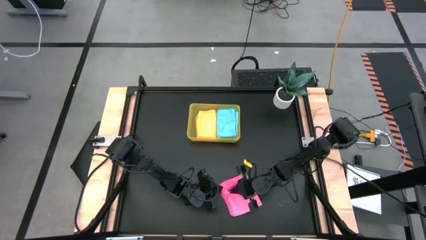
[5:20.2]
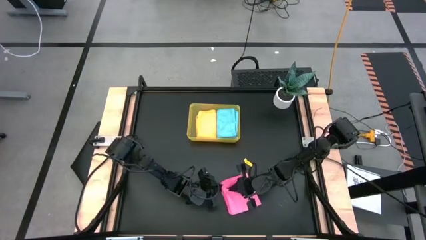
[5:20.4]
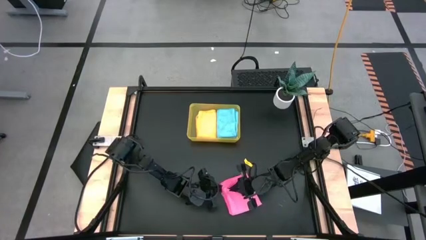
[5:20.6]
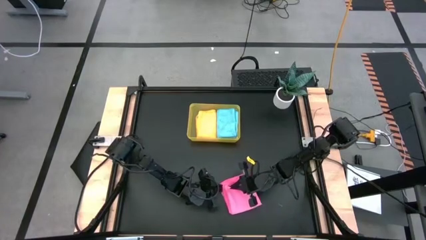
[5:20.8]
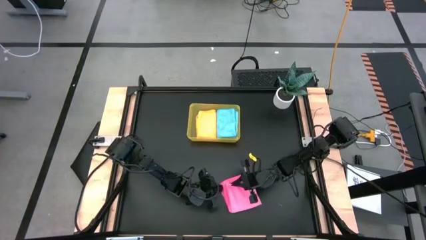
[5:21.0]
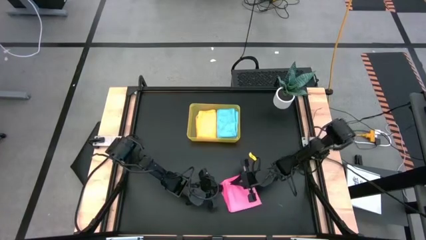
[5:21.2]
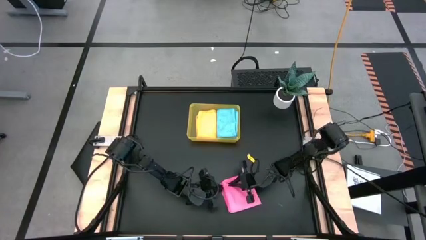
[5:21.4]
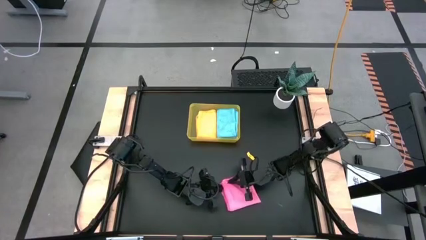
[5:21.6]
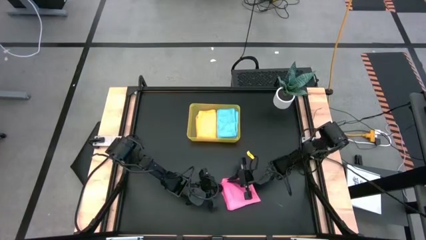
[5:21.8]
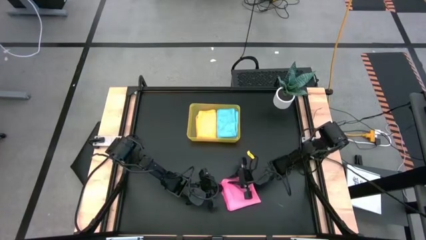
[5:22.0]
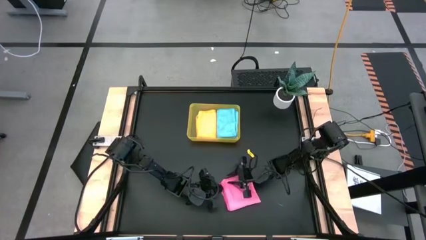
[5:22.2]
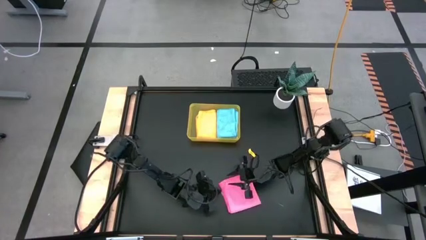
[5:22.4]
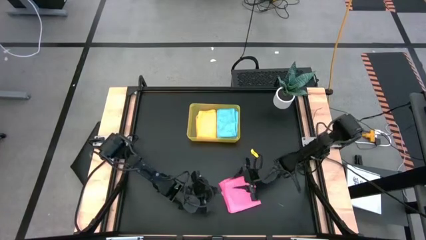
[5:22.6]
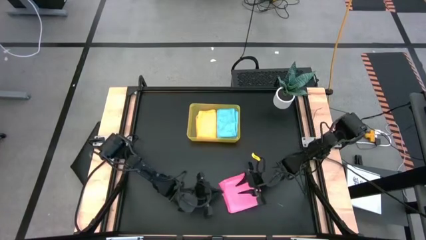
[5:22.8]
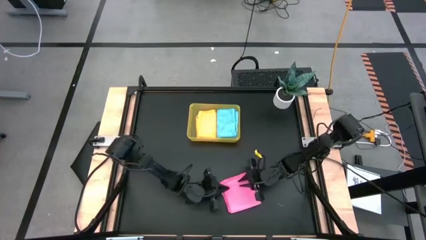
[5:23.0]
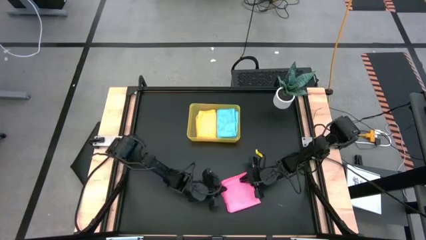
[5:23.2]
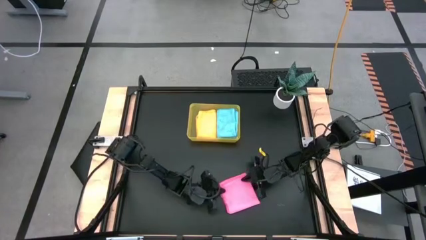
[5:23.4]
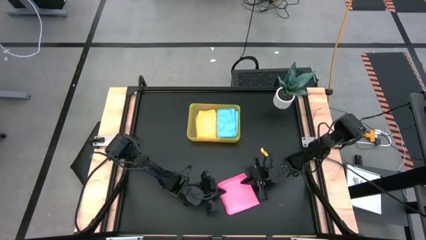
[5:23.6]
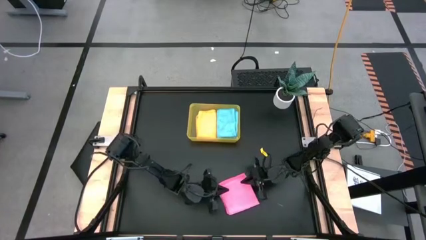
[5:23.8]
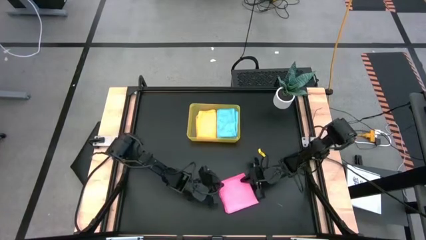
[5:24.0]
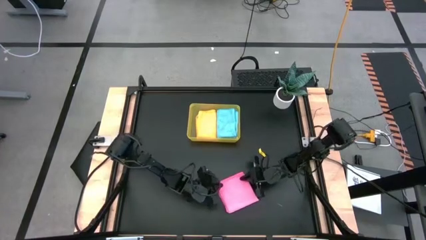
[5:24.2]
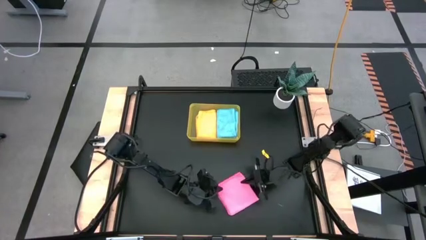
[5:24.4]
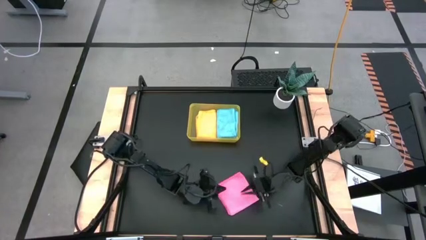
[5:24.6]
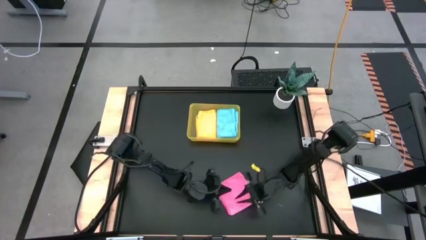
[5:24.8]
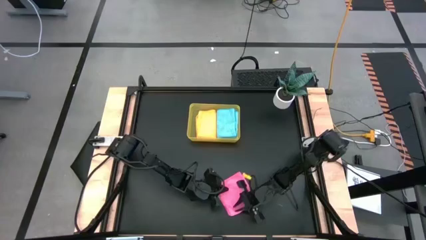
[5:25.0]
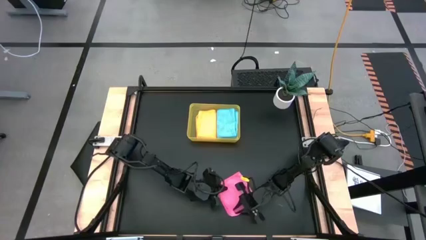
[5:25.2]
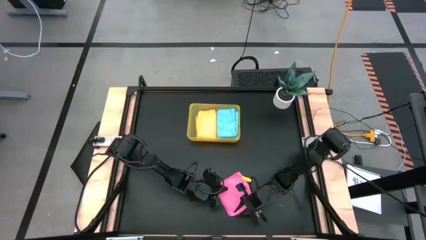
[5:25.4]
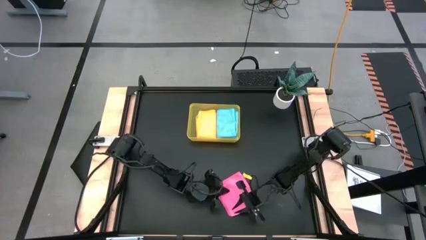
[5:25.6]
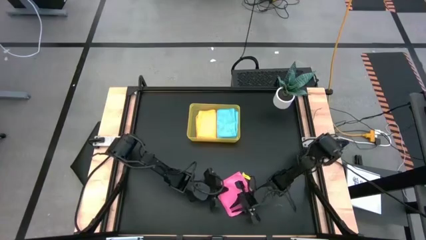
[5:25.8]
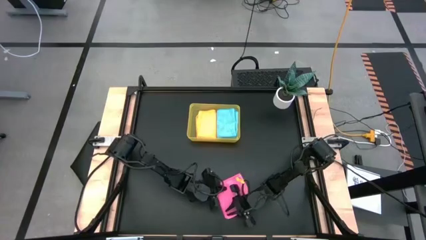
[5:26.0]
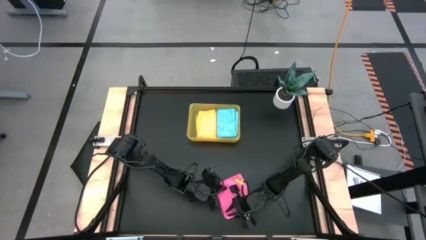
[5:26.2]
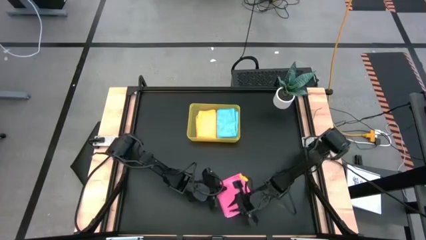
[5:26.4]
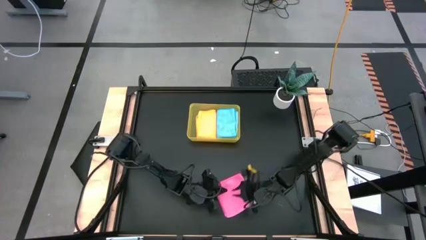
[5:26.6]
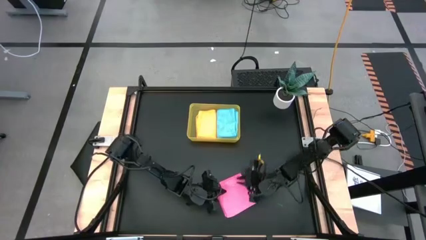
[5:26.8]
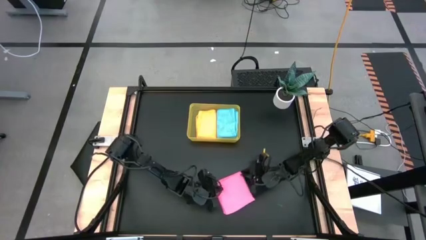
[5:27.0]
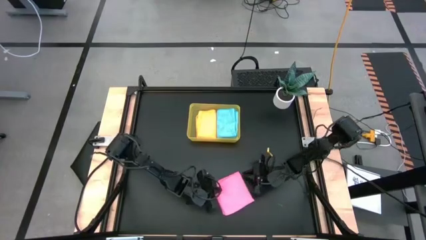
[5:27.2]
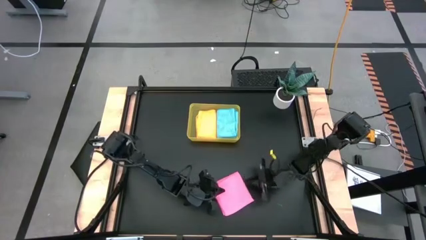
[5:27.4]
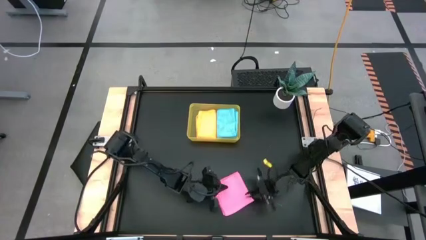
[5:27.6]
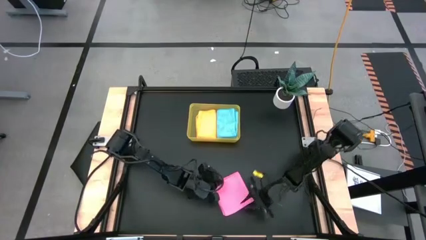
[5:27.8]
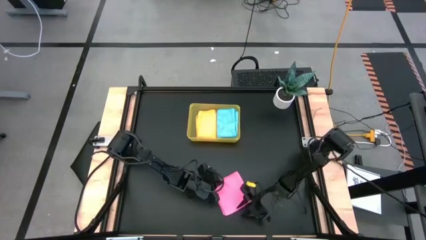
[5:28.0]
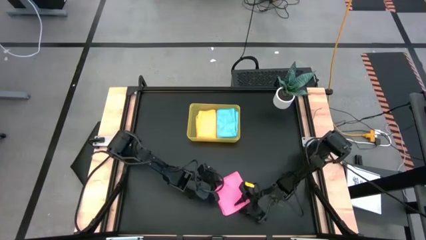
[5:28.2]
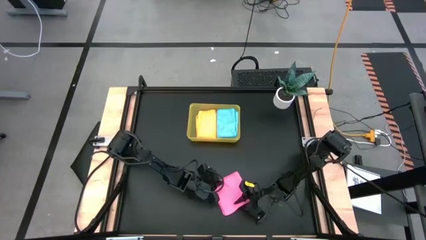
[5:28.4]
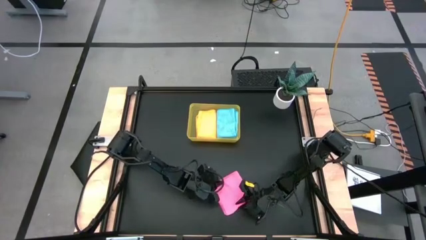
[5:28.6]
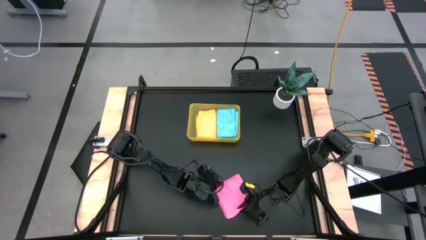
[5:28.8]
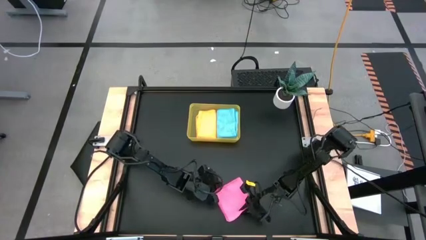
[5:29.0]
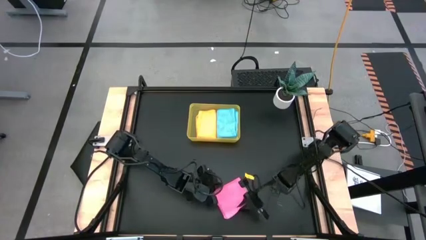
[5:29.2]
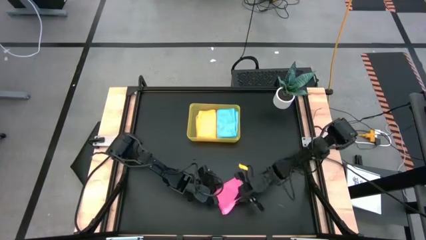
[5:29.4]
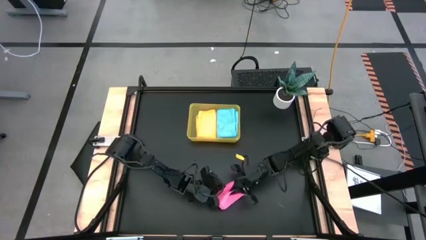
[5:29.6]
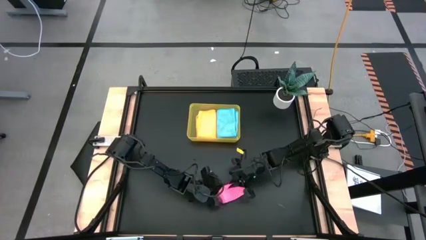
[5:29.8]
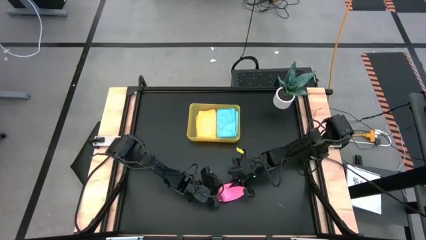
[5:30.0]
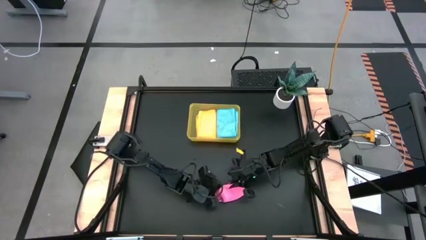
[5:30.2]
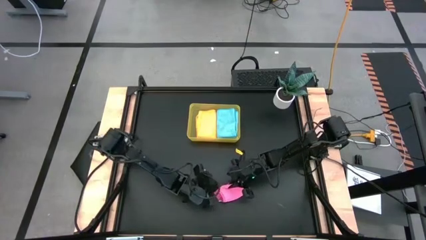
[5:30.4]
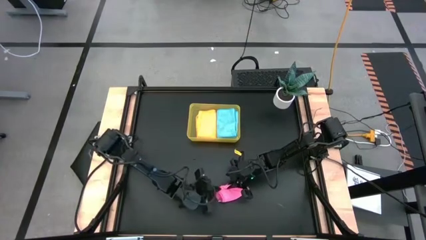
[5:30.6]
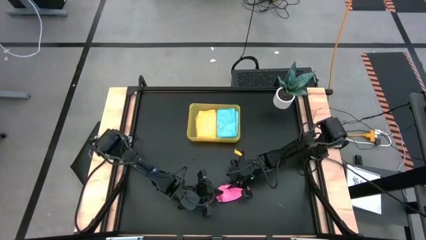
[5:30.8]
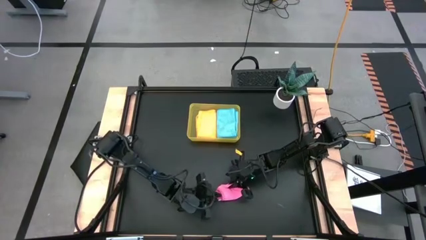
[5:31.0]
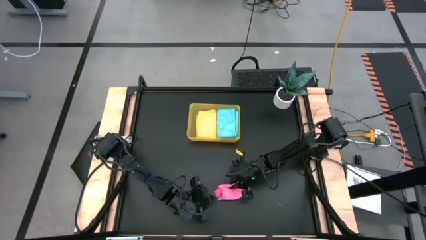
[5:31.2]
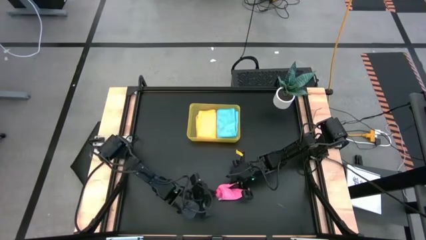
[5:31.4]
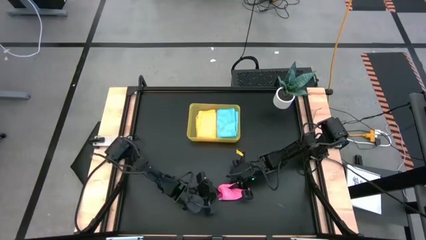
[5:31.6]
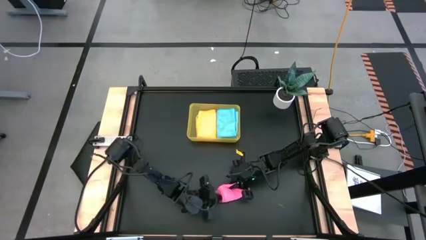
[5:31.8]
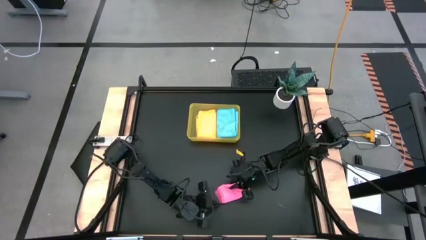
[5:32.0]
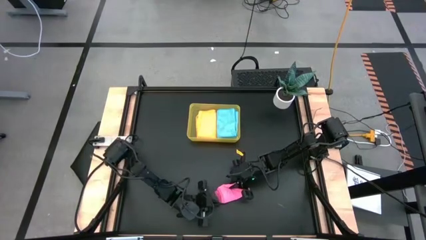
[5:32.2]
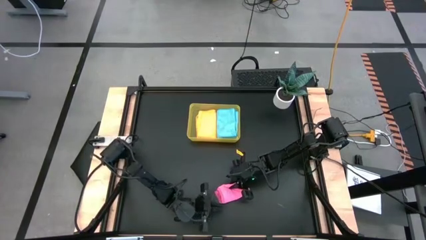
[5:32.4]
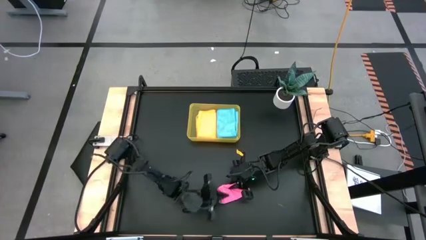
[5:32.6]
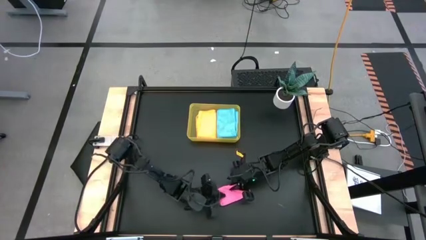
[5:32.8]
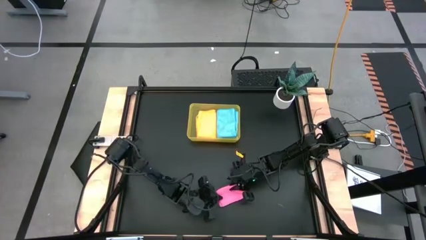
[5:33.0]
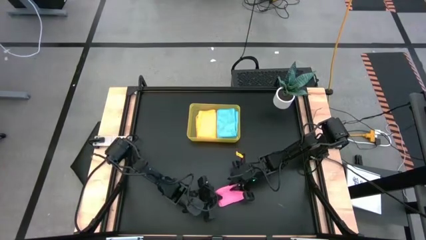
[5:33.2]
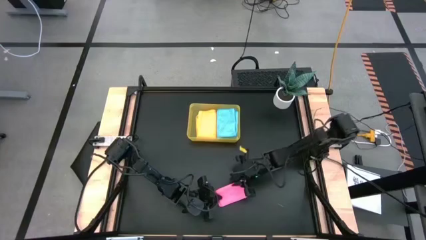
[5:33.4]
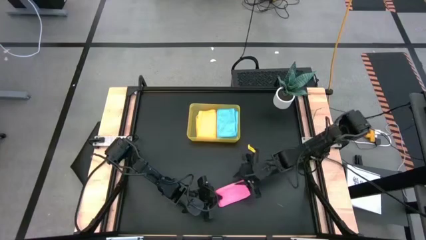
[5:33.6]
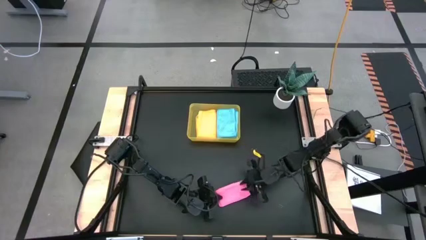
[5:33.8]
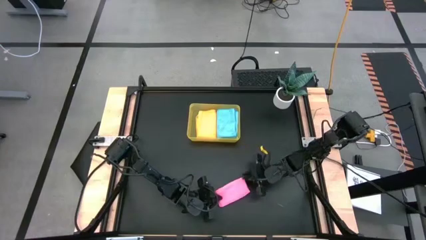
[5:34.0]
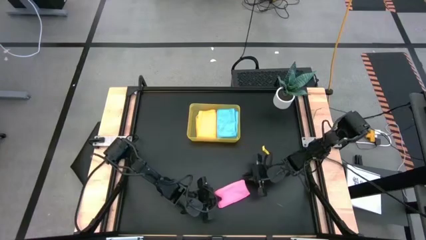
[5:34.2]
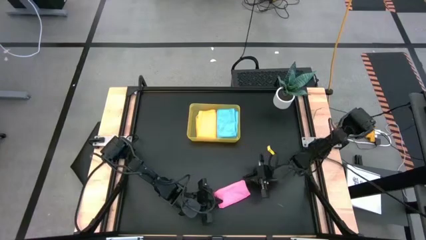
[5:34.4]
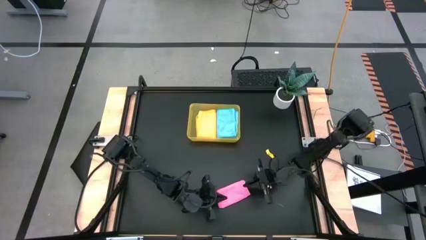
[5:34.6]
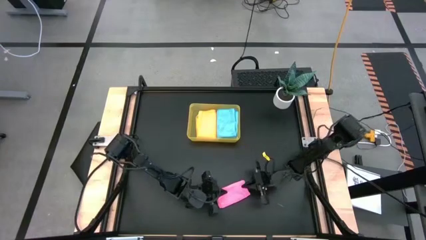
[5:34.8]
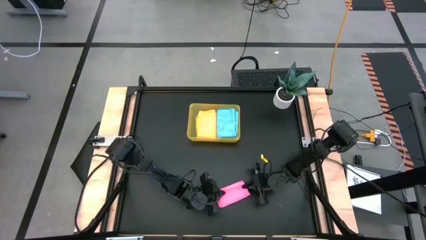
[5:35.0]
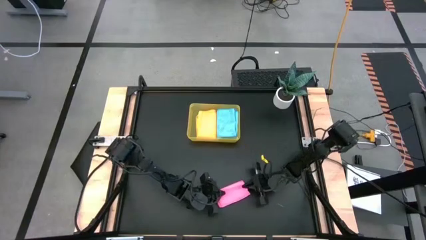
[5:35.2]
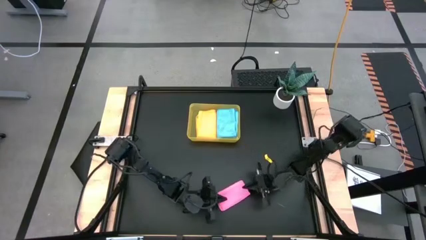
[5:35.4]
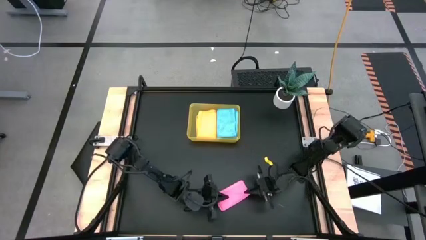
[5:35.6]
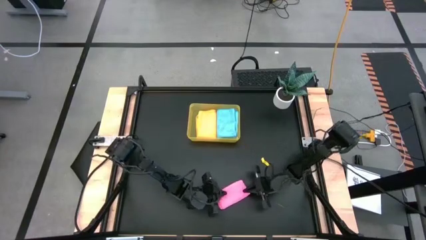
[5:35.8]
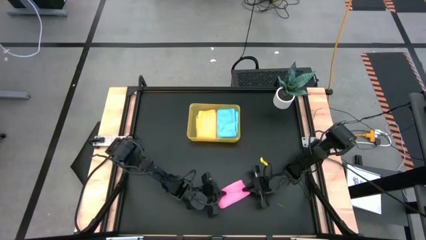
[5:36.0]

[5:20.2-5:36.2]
Task: Fold microfiber towels
Fold the pink microfiber cloth
